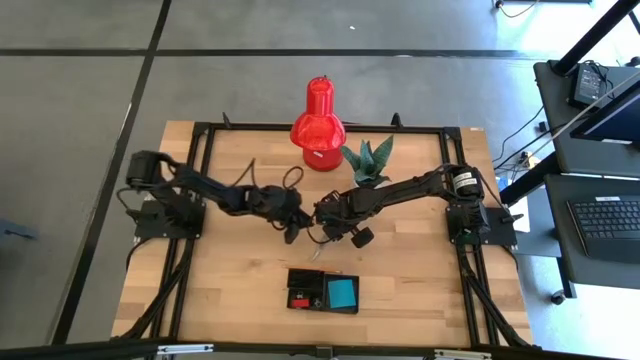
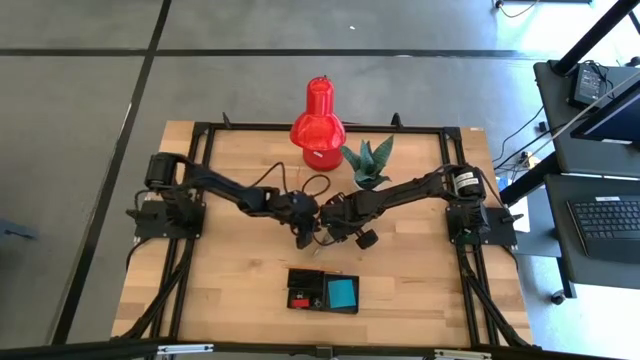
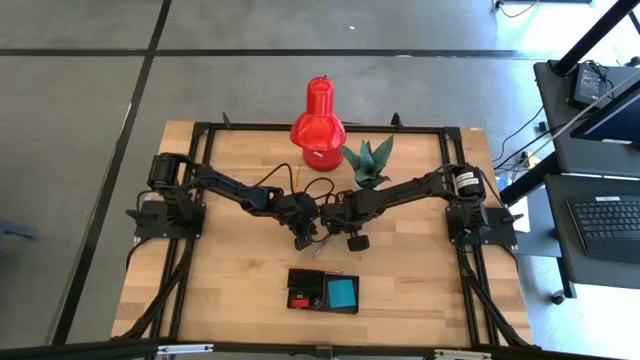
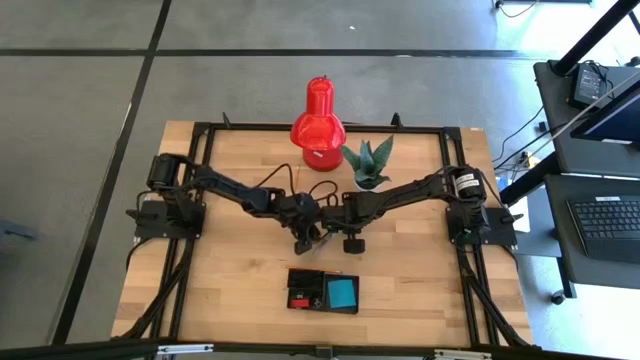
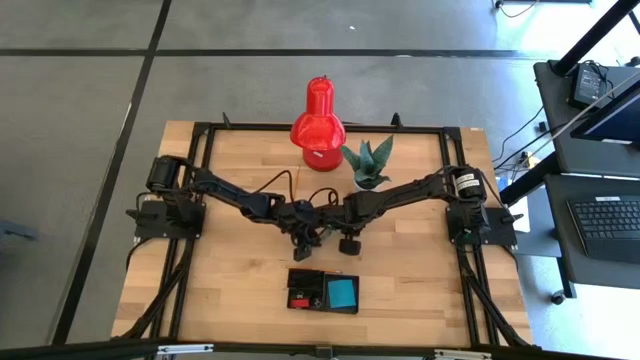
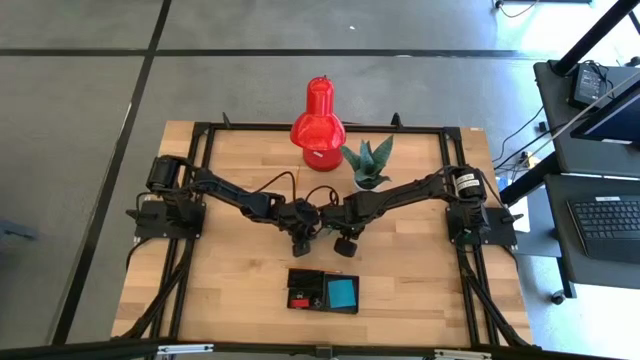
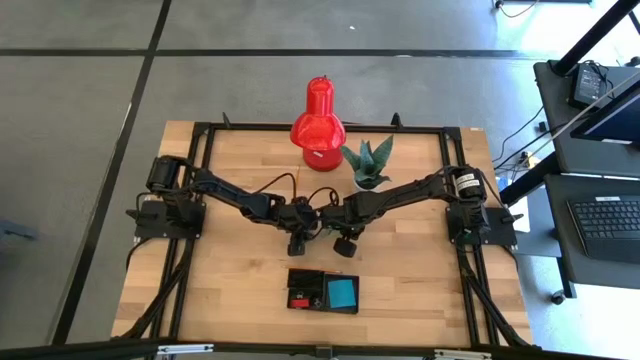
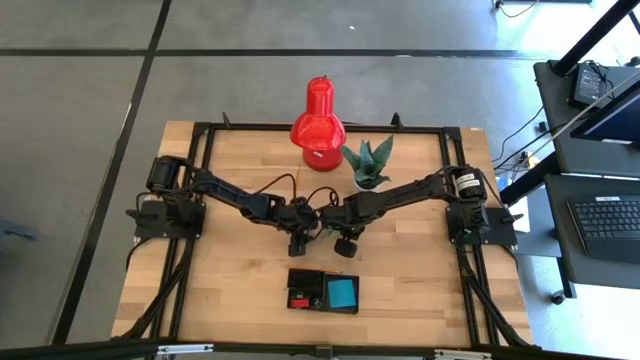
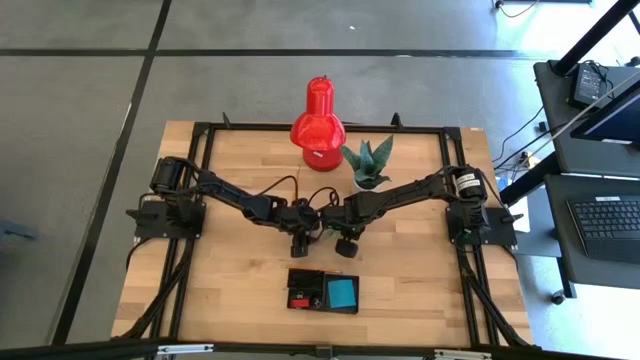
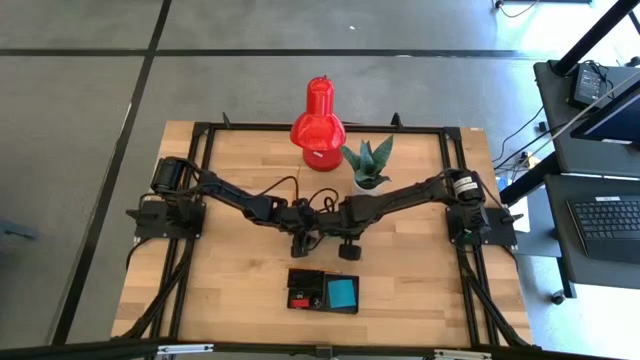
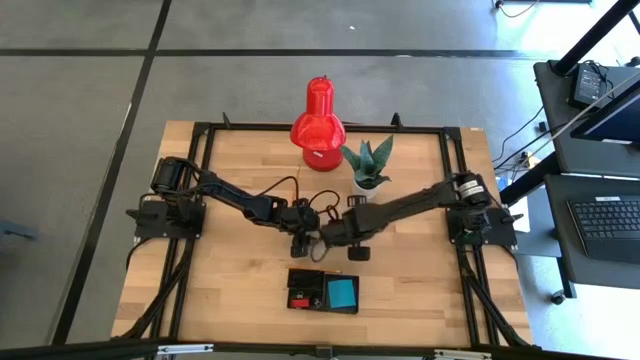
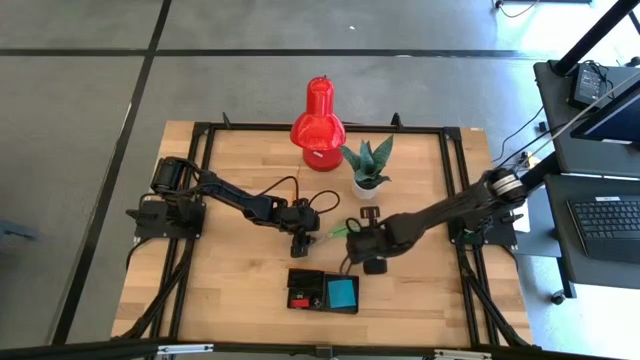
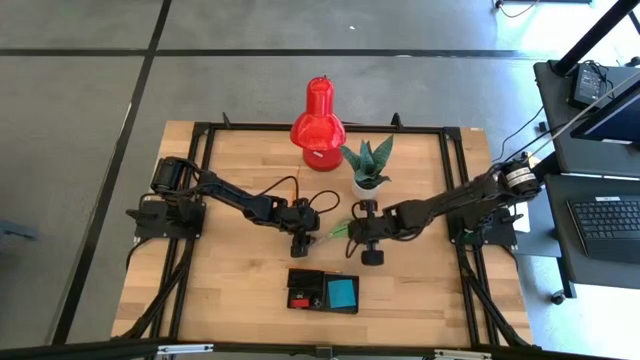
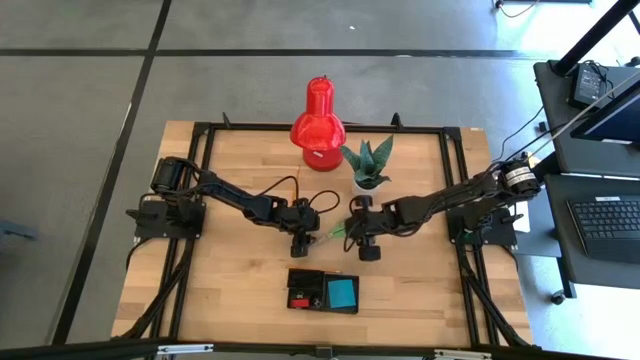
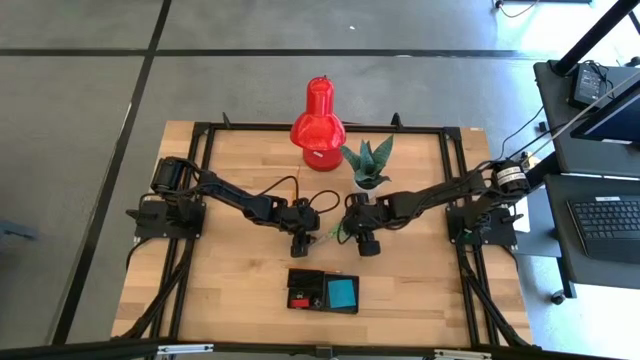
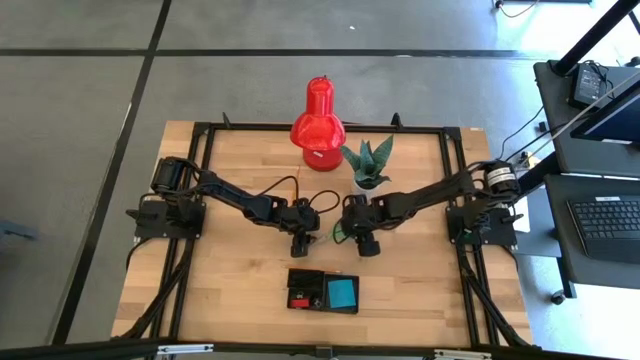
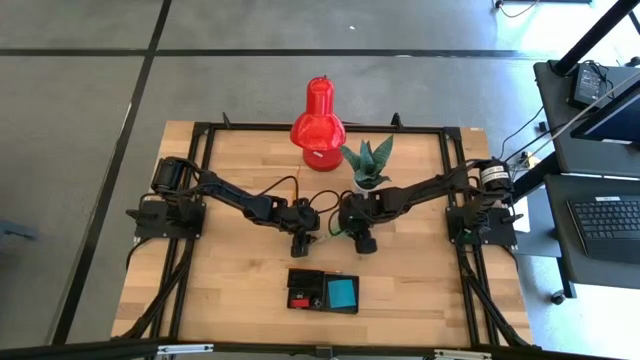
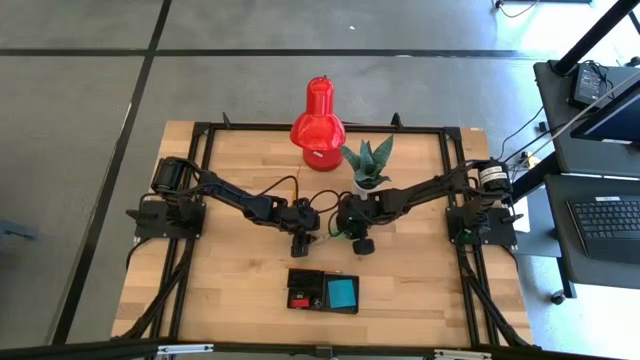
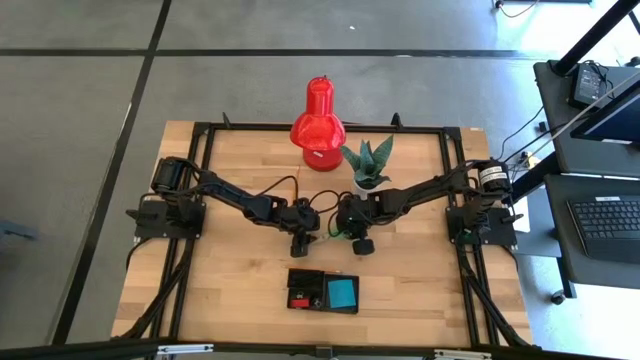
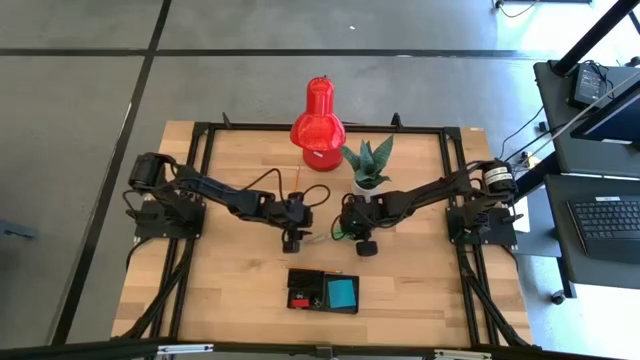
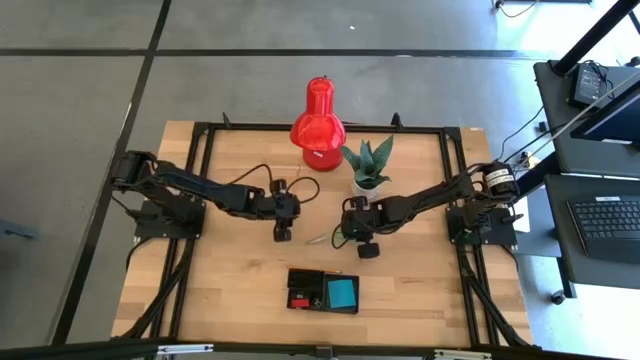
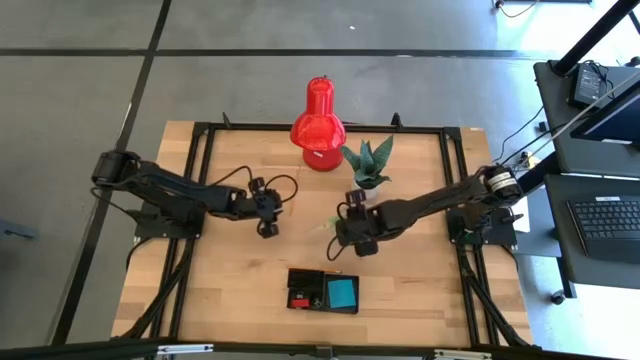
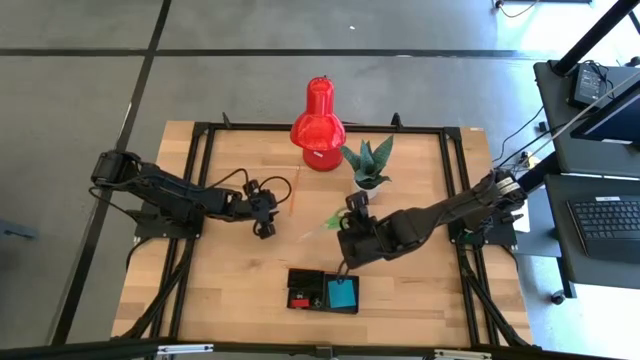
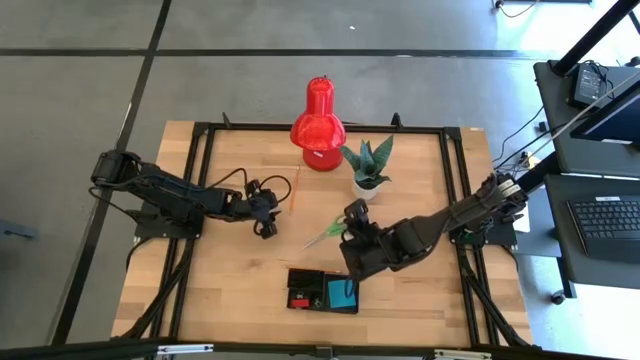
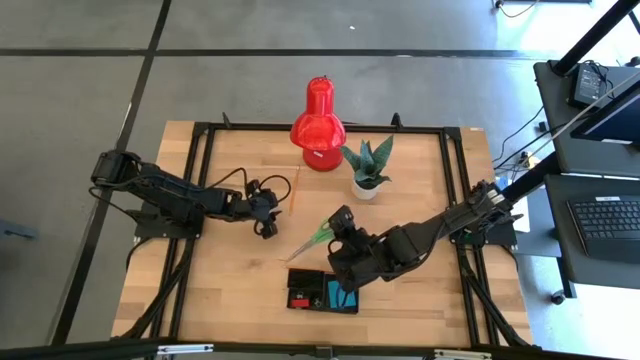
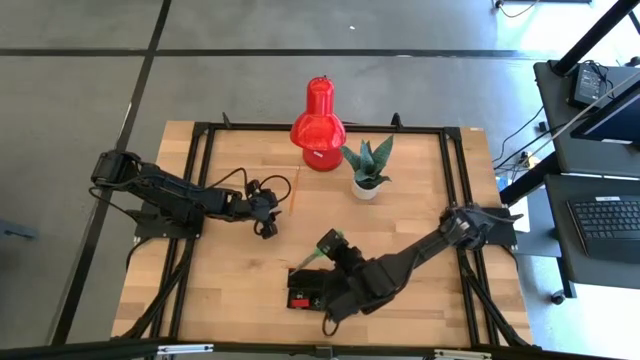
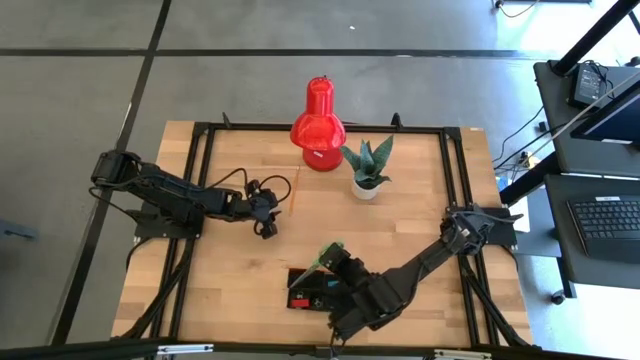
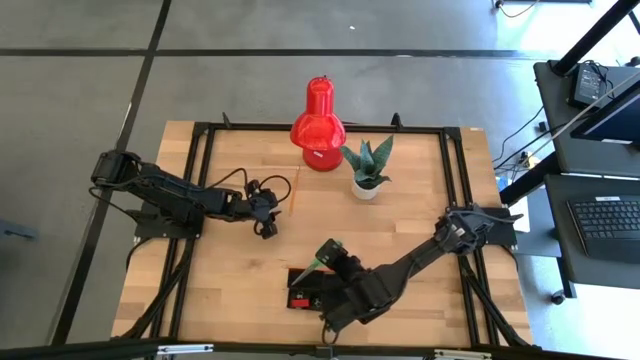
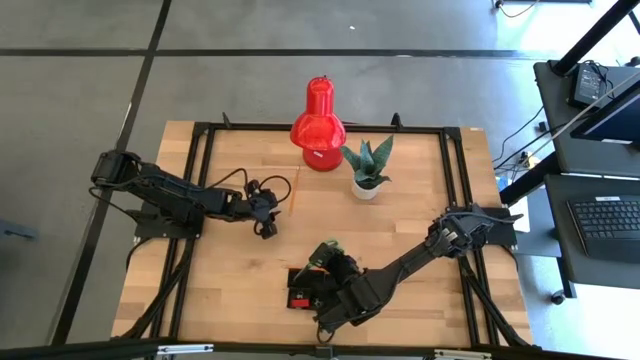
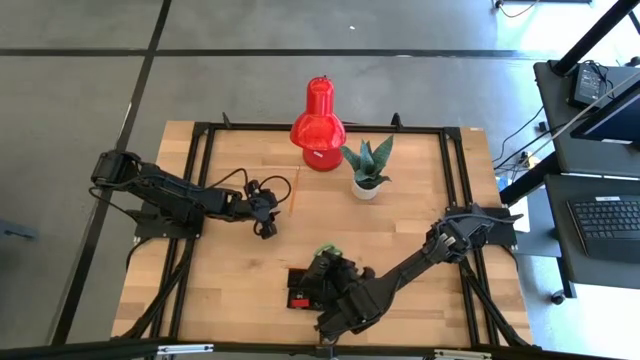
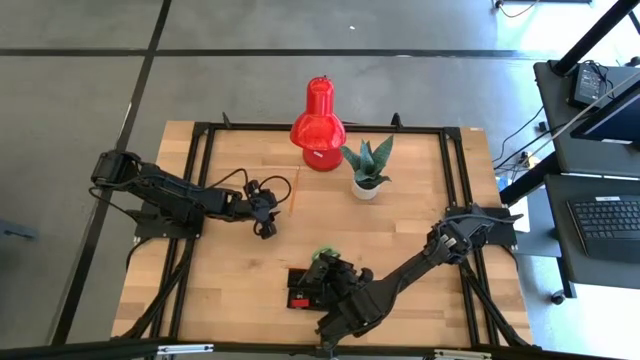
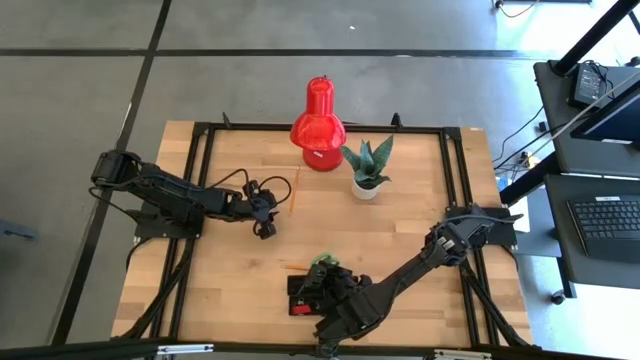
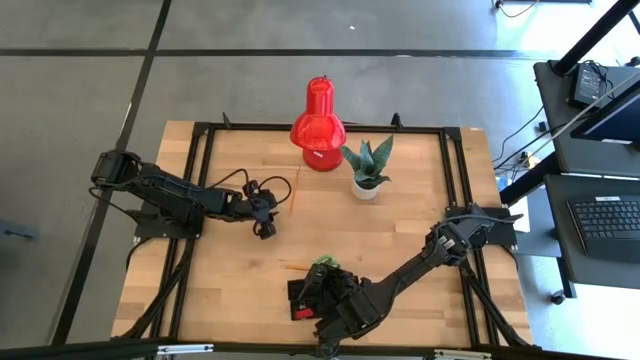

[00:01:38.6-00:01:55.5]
Task: Pick and place office supplies into organizer
Put the green scissors into the desk organizer

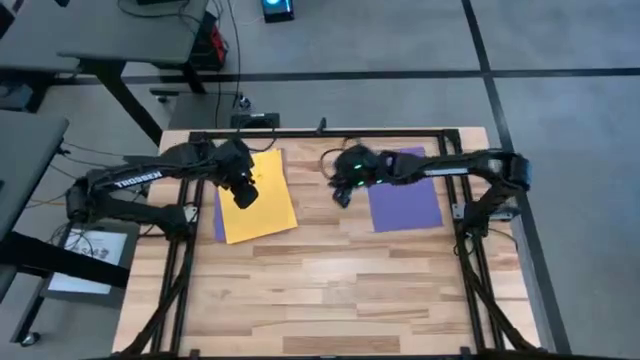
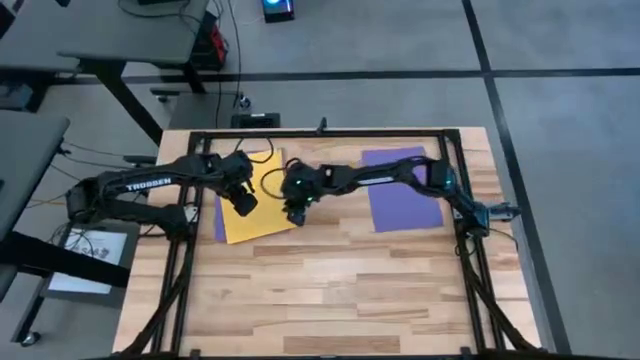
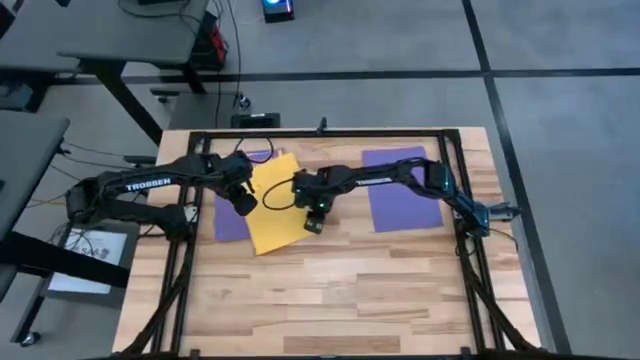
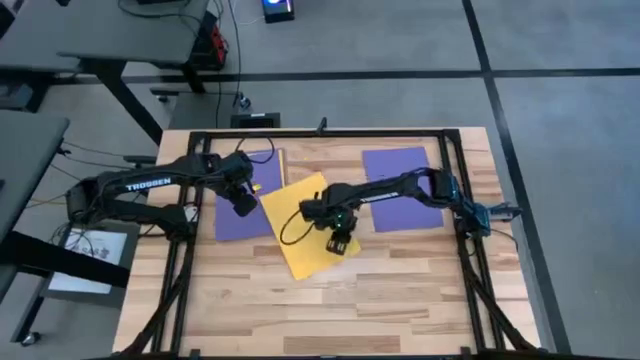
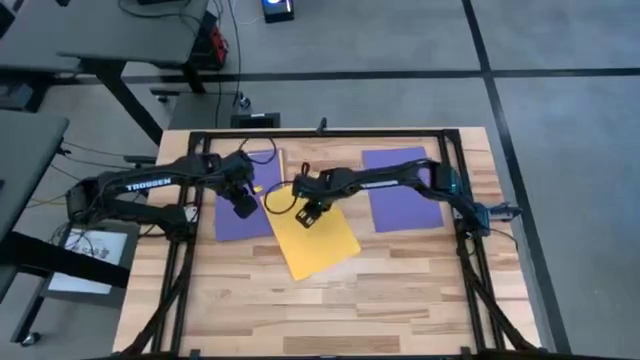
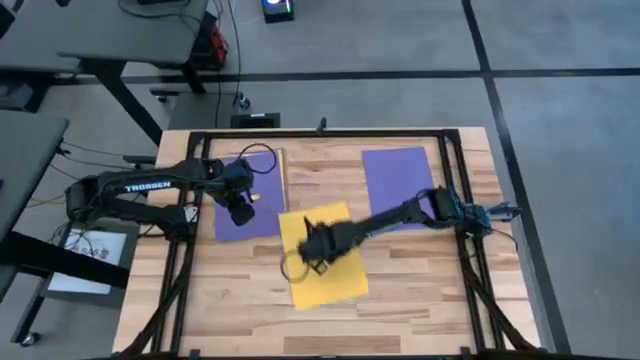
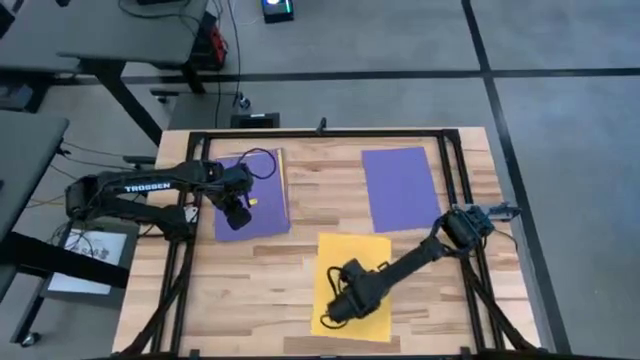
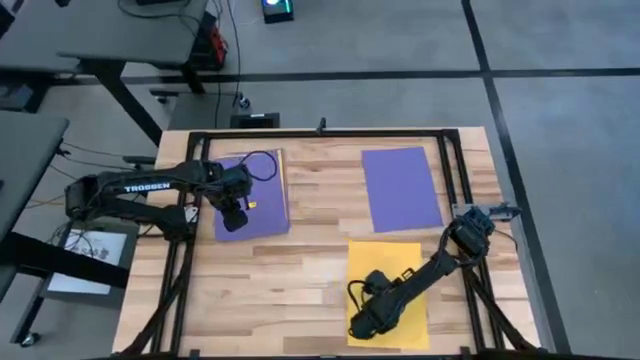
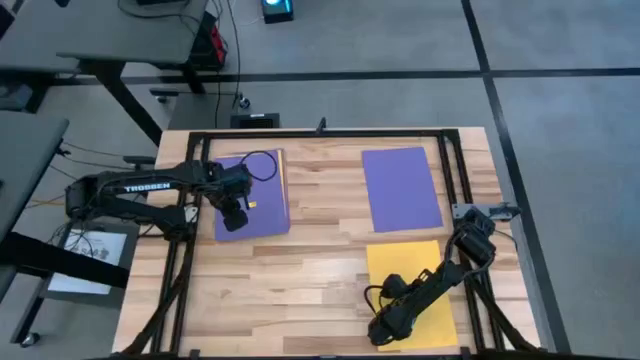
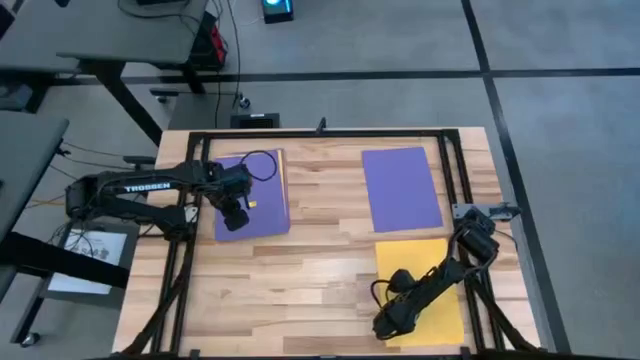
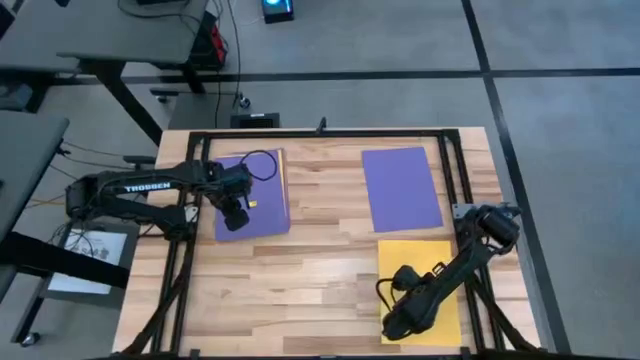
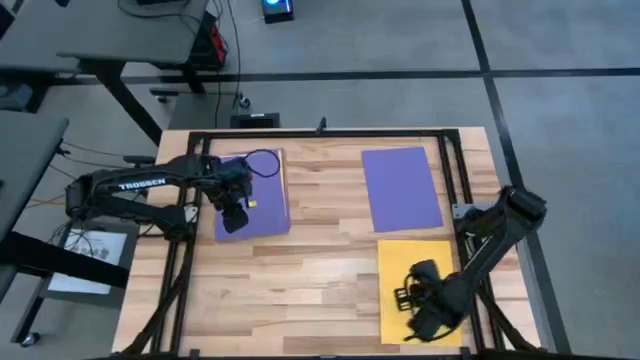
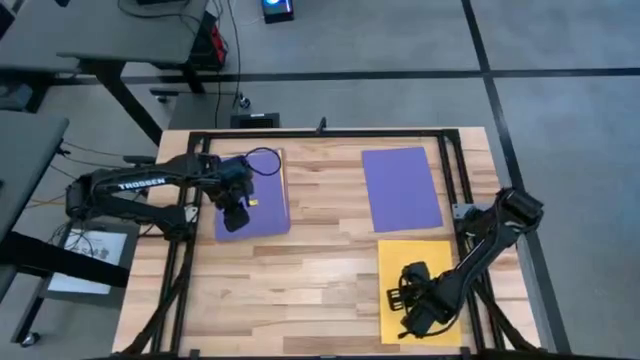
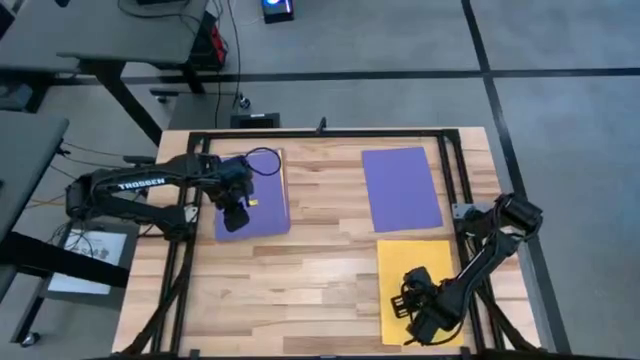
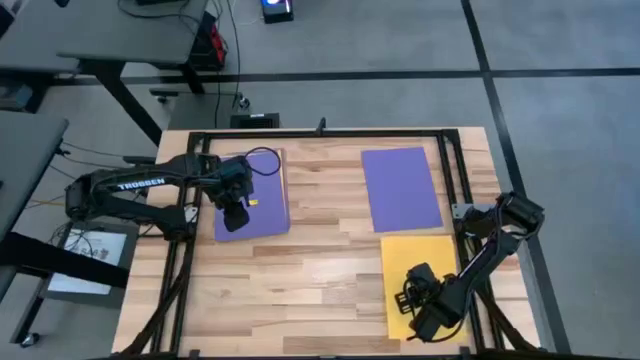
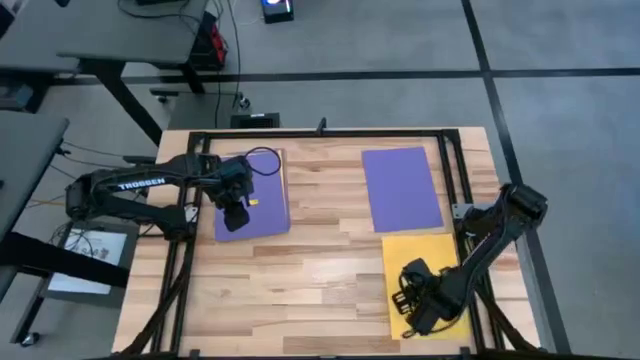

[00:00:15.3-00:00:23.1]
Task: Organize paper
Put the yellow paper into the bottom right of the table
